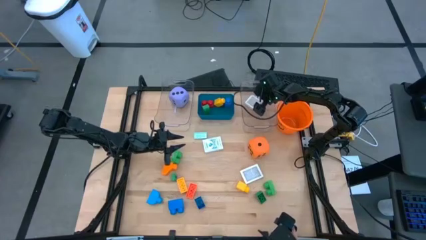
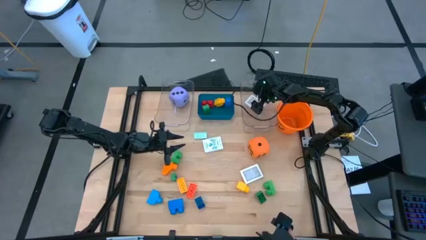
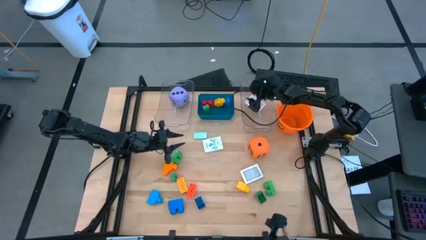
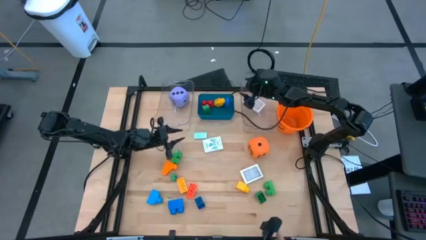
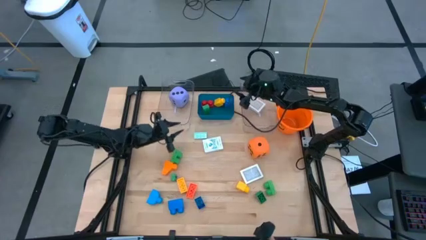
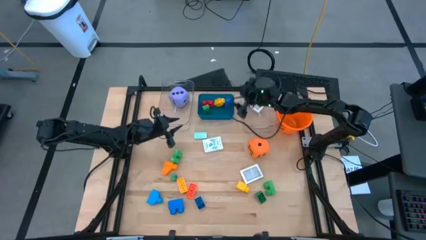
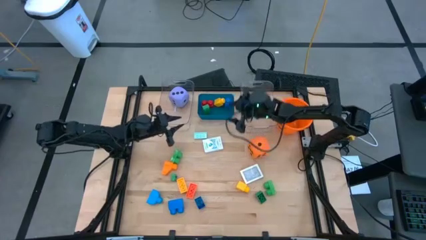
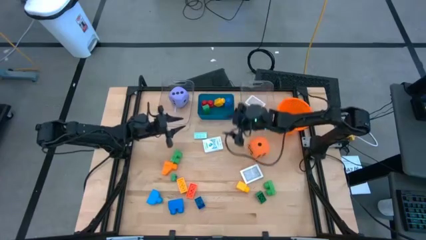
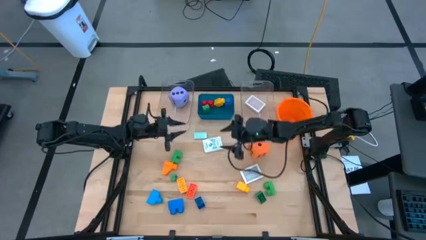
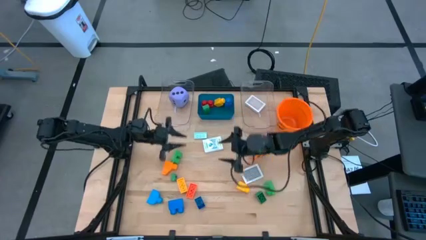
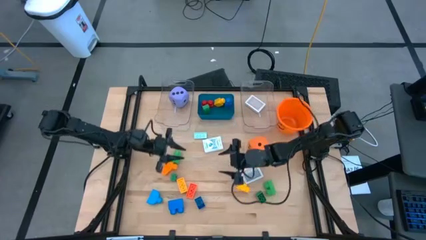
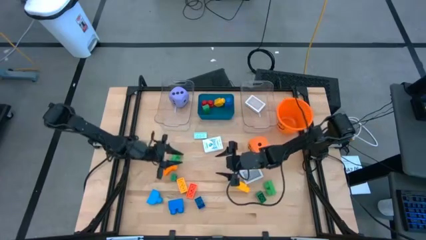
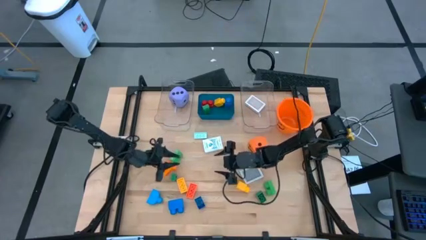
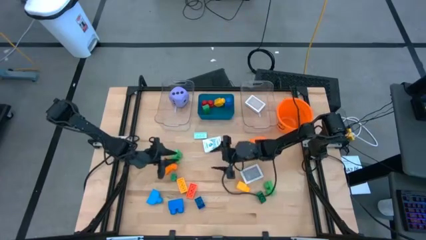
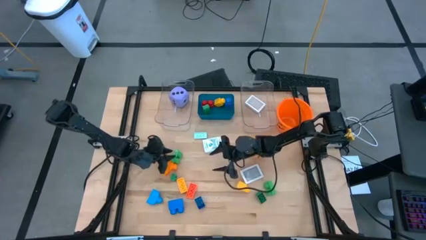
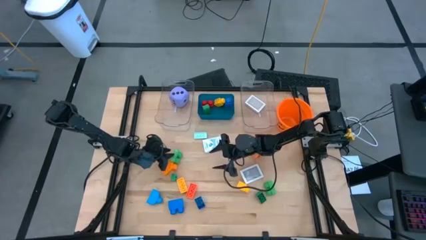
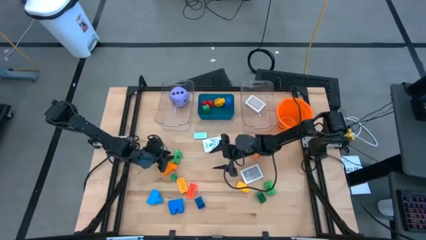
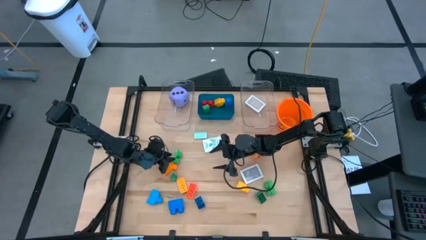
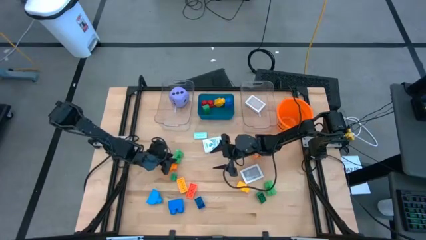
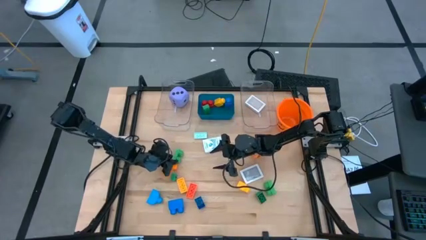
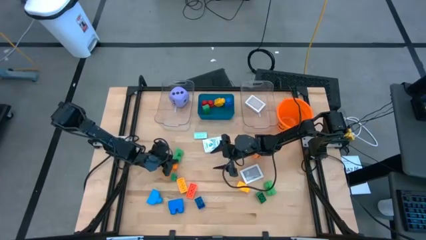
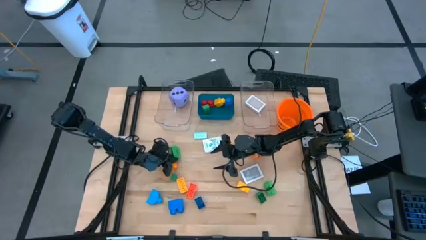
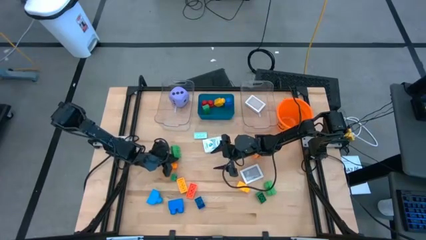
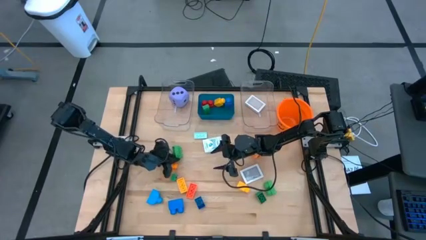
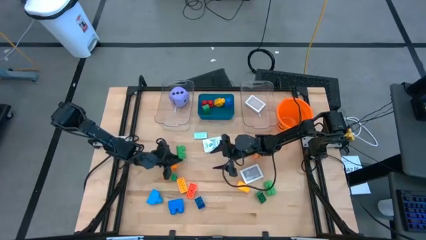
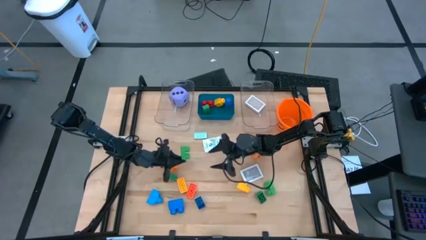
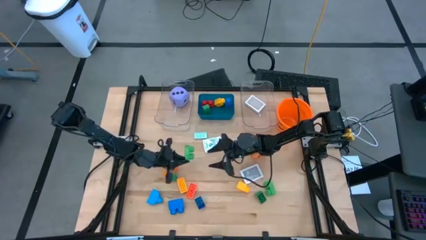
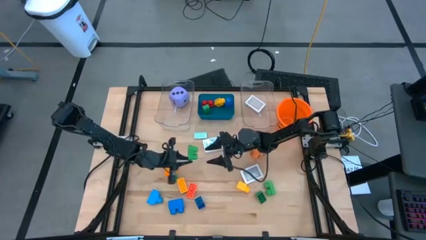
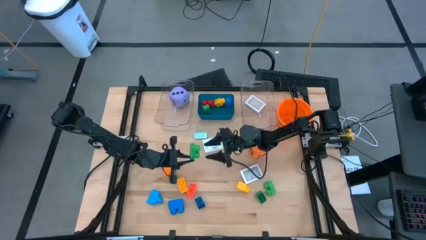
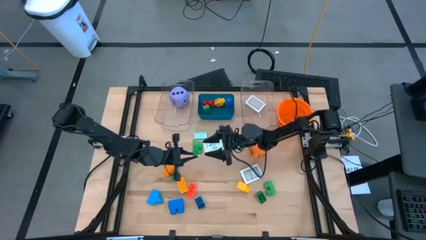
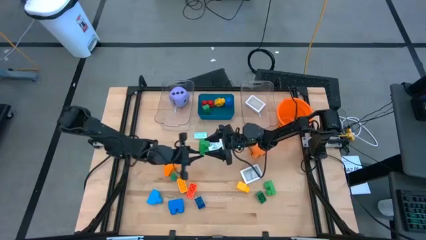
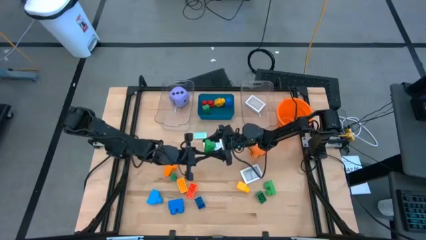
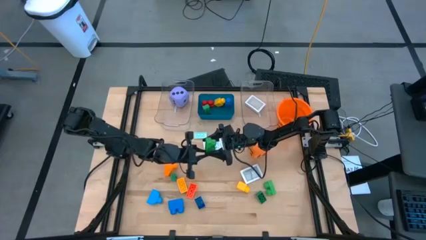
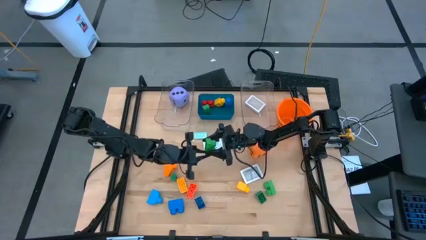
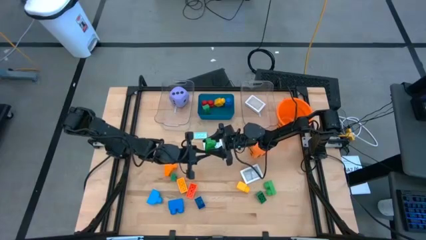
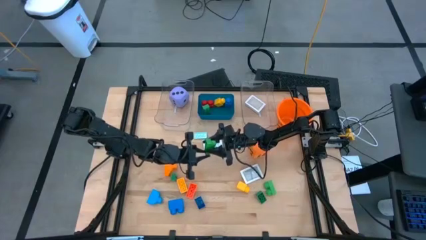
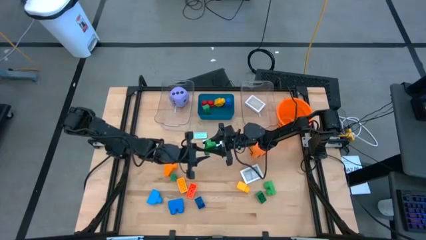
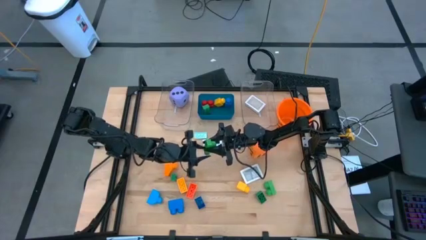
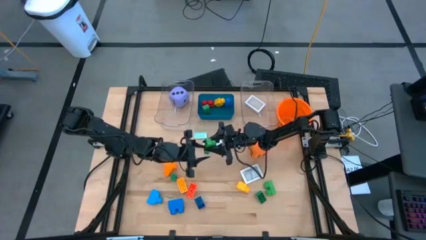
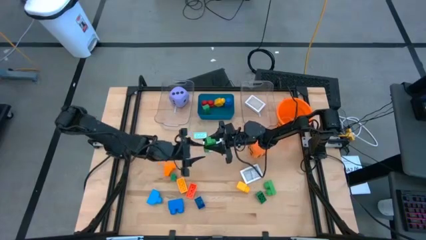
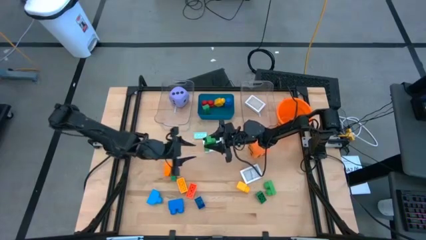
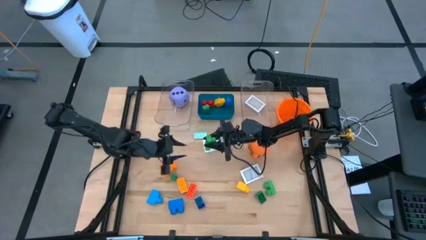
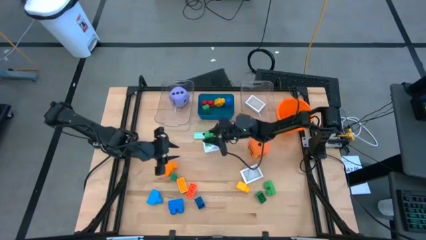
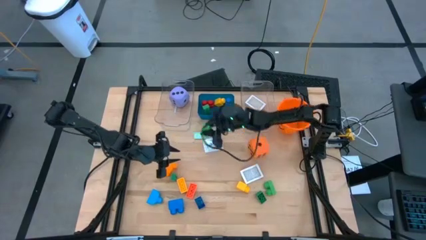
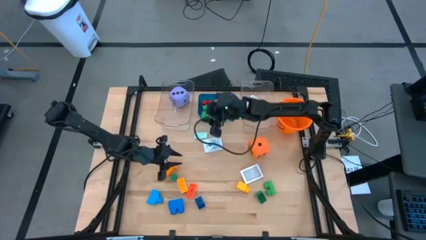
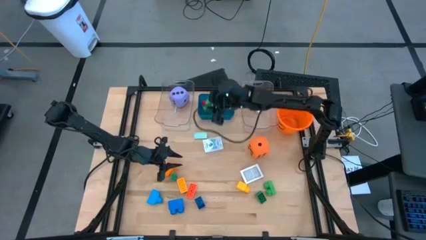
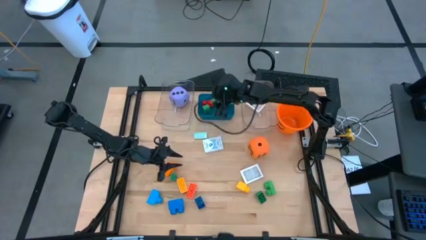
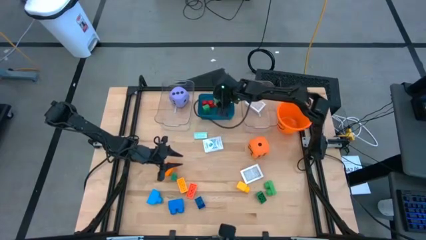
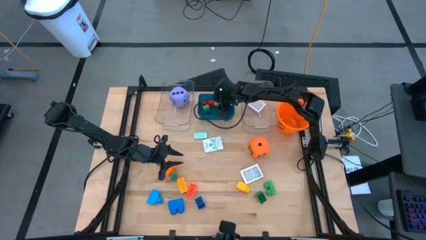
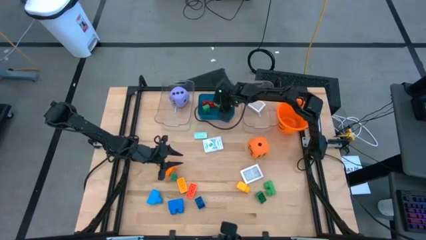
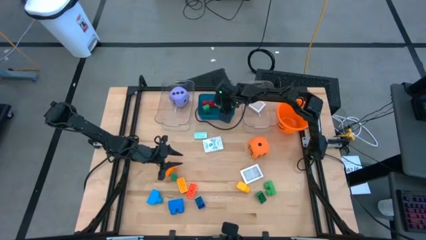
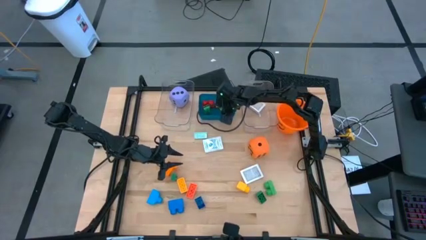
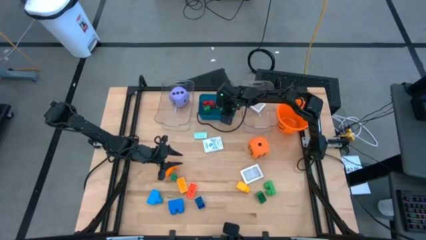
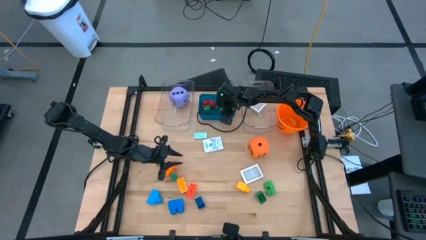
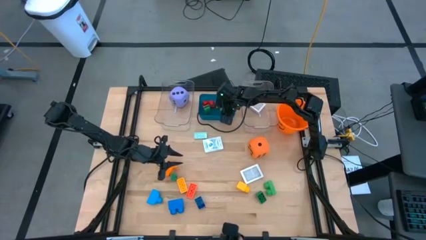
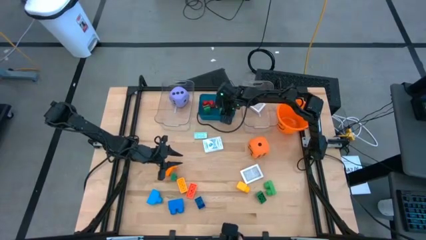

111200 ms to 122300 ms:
Task: Pick & Place Toys
Put the green game piece into the blue bin

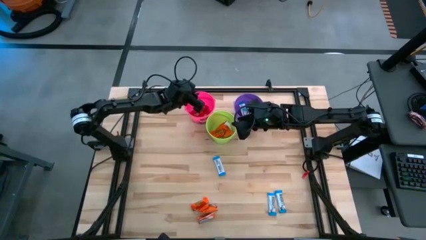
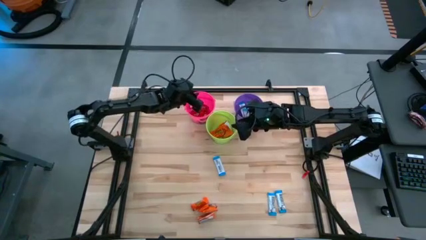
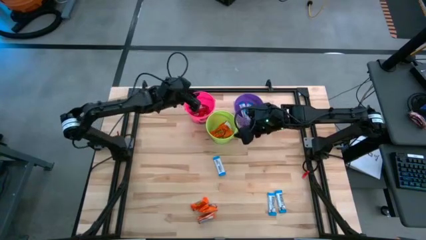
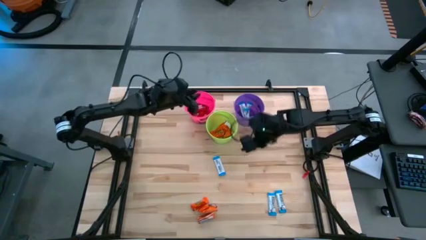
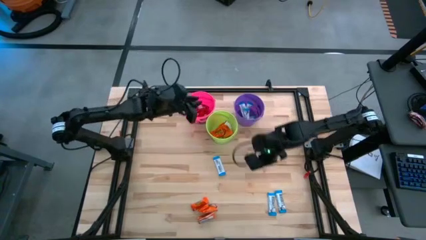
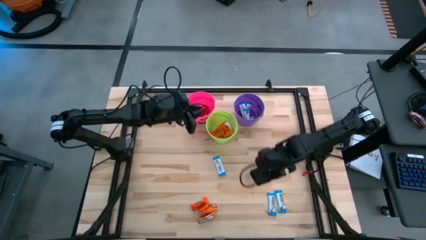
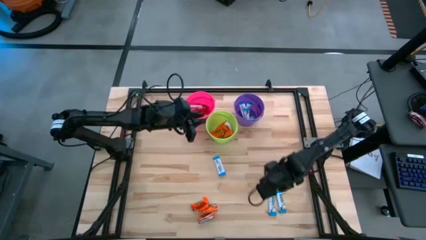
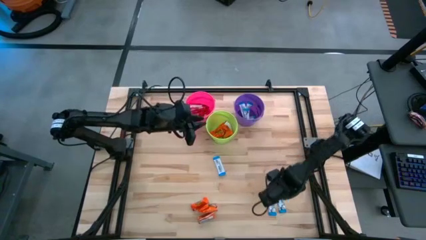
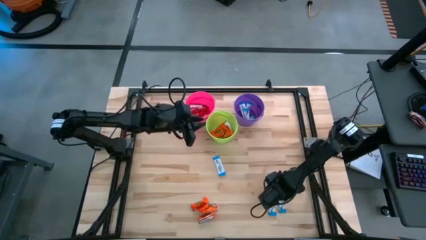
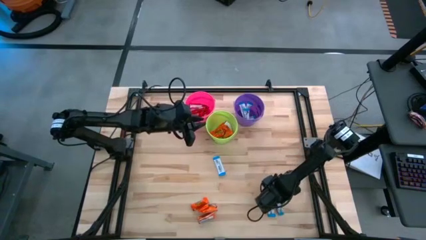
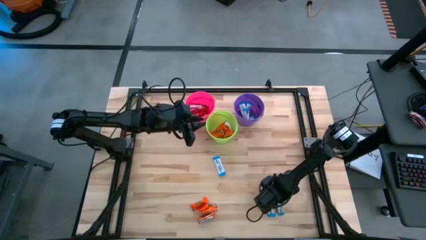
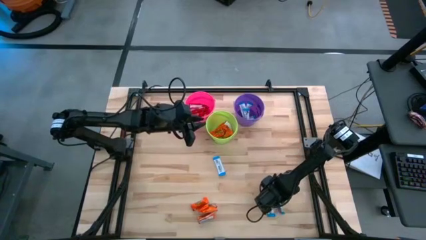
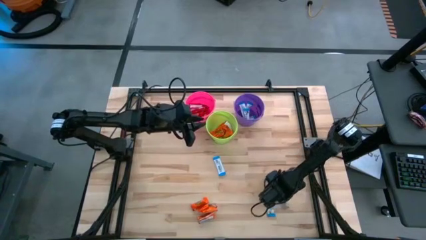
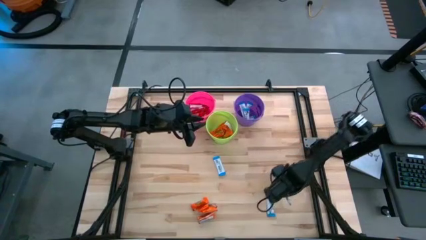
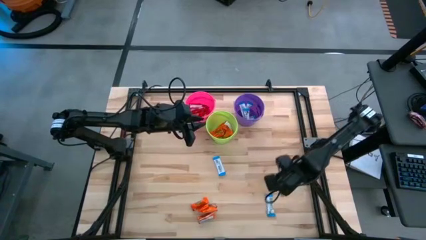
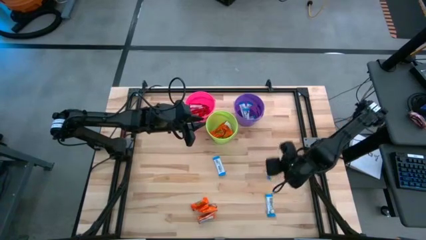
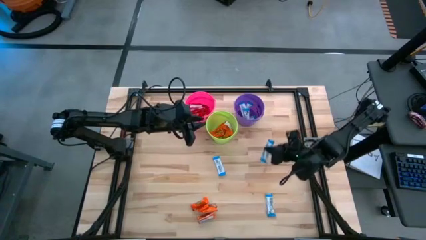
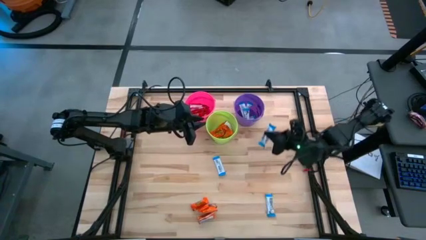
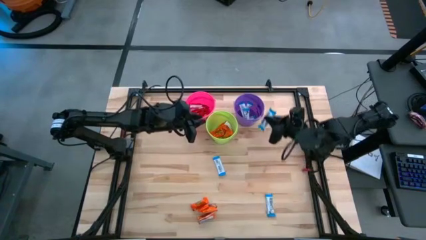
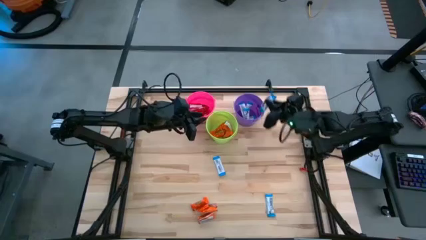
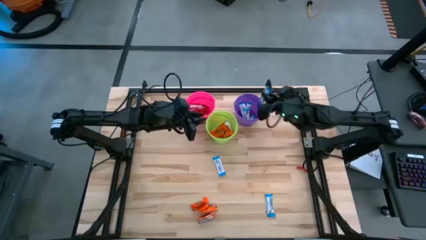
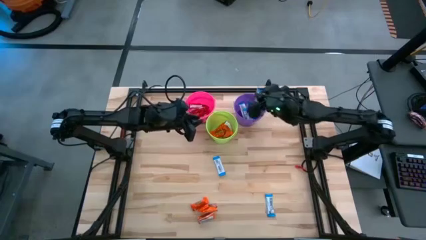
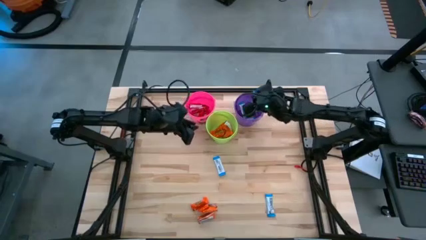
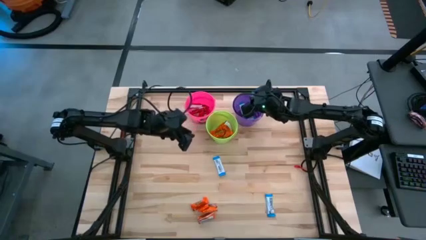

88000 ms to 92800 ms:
Task: Sort candy
Put the blue candy into the violet bin
